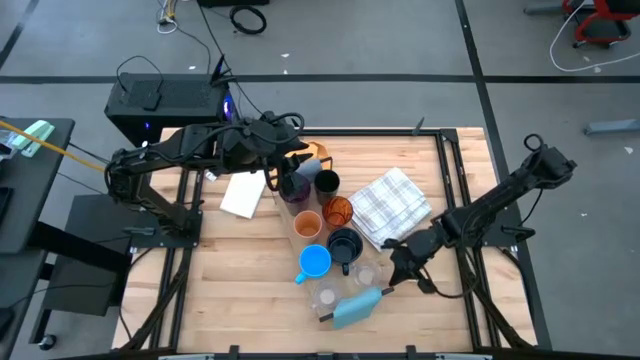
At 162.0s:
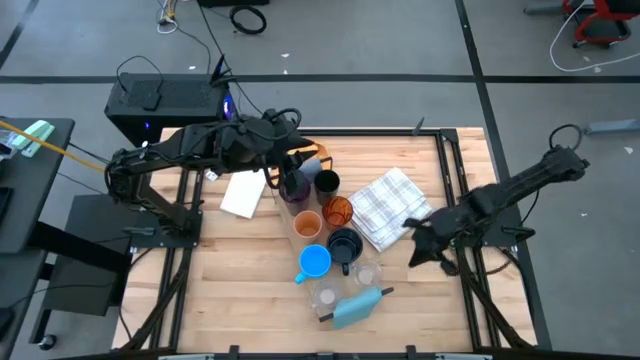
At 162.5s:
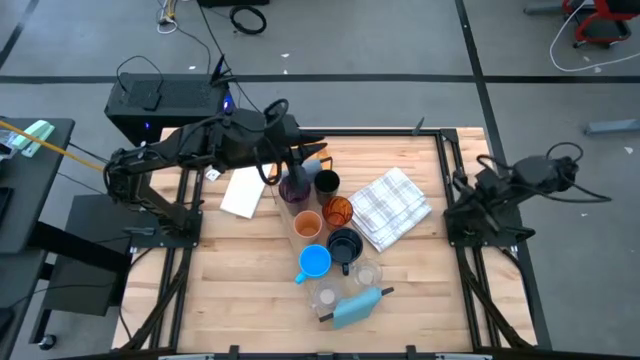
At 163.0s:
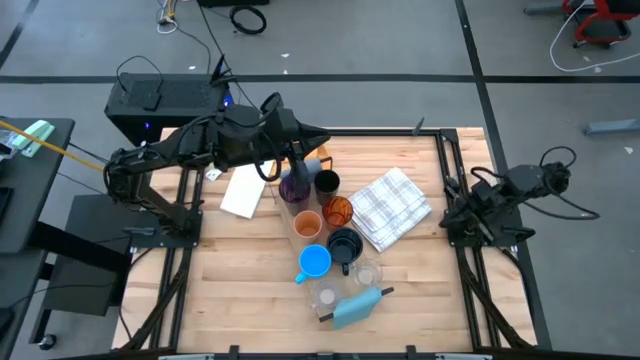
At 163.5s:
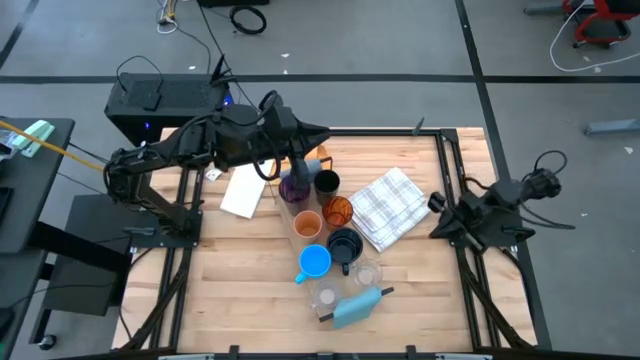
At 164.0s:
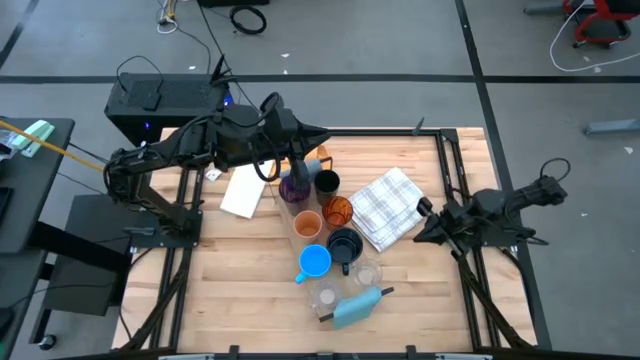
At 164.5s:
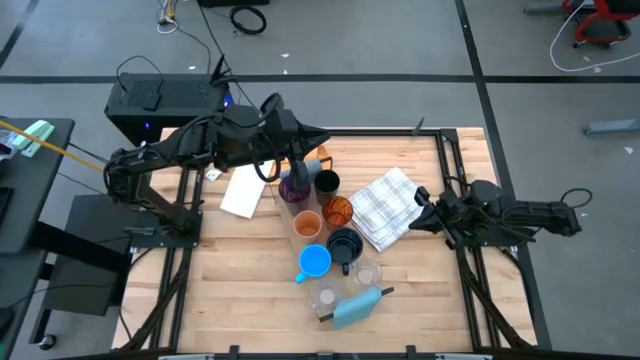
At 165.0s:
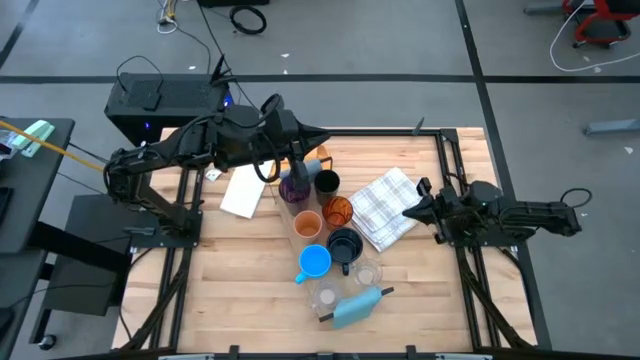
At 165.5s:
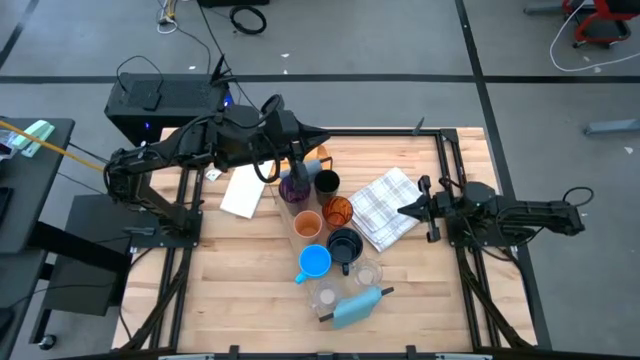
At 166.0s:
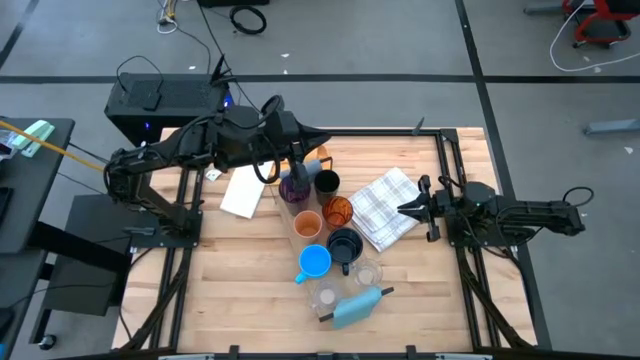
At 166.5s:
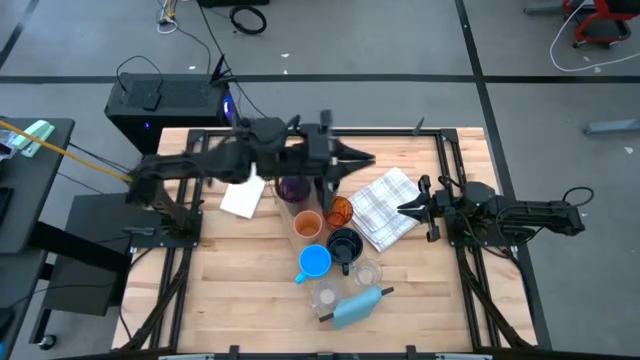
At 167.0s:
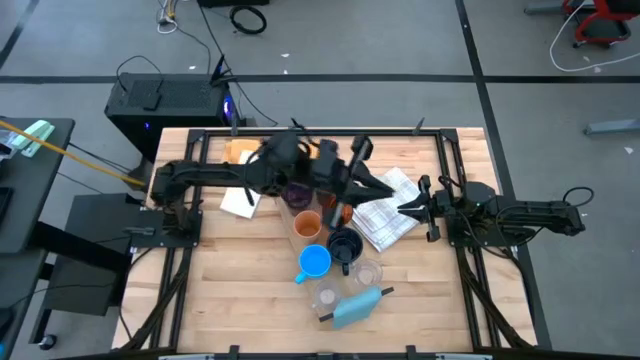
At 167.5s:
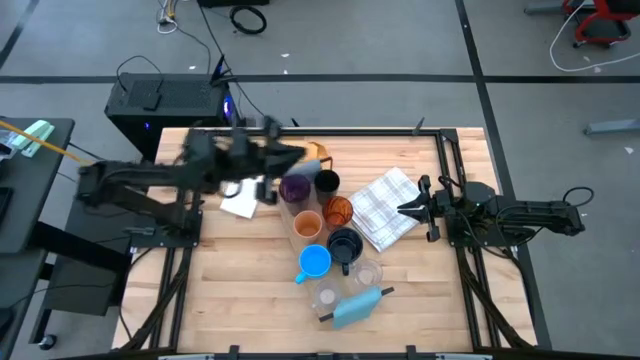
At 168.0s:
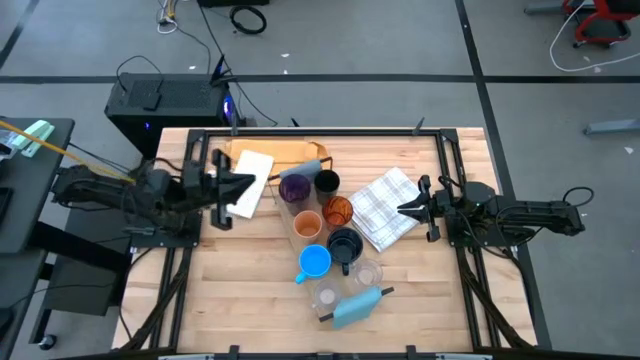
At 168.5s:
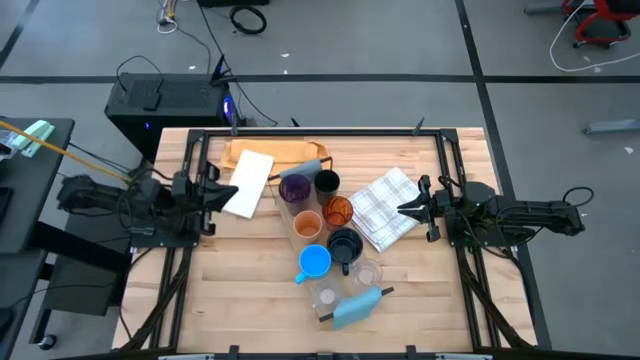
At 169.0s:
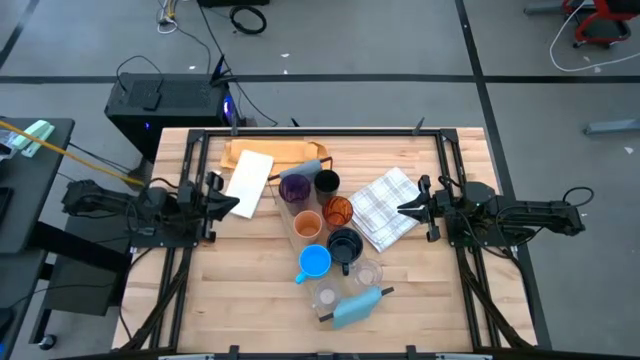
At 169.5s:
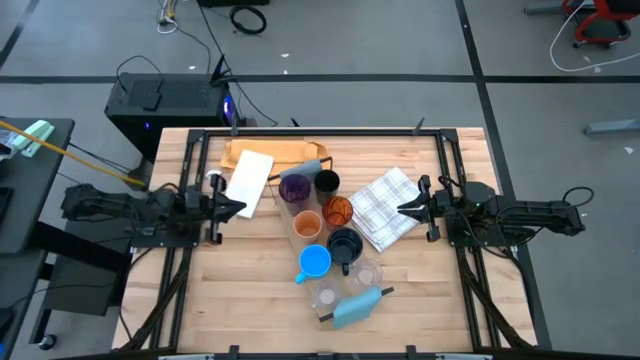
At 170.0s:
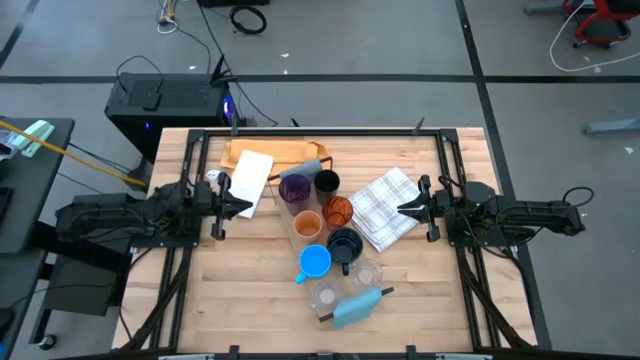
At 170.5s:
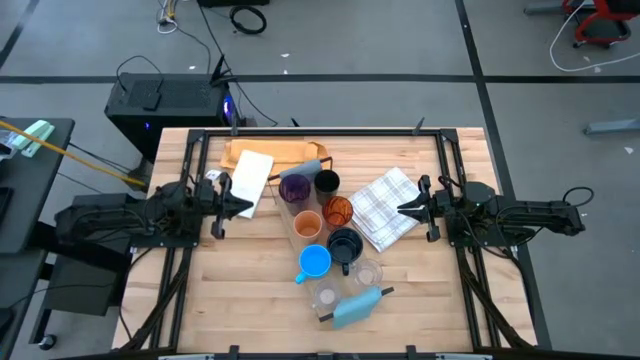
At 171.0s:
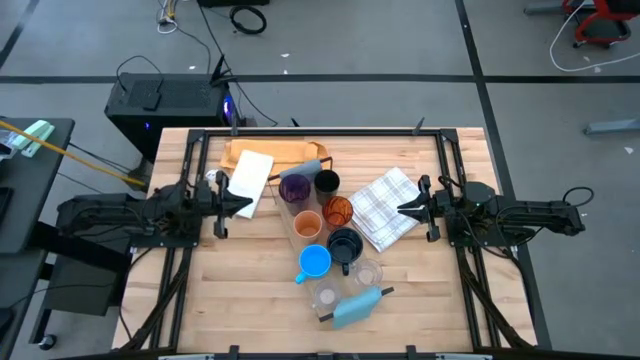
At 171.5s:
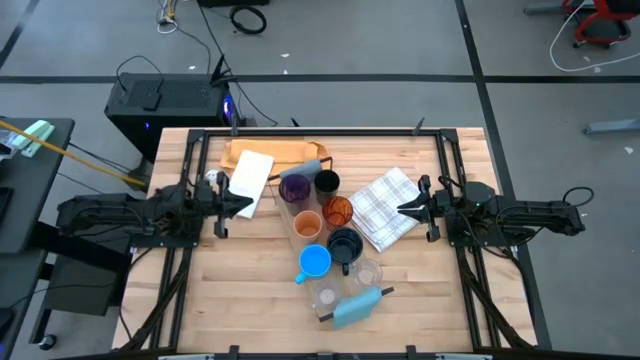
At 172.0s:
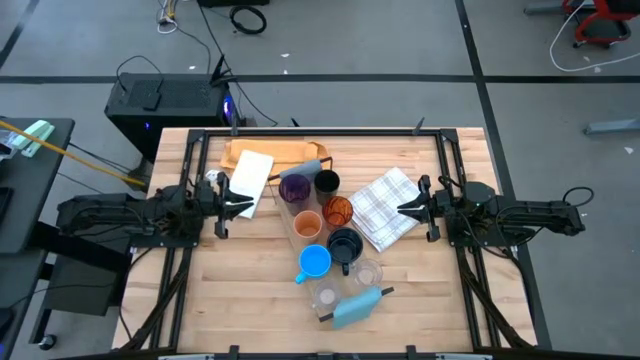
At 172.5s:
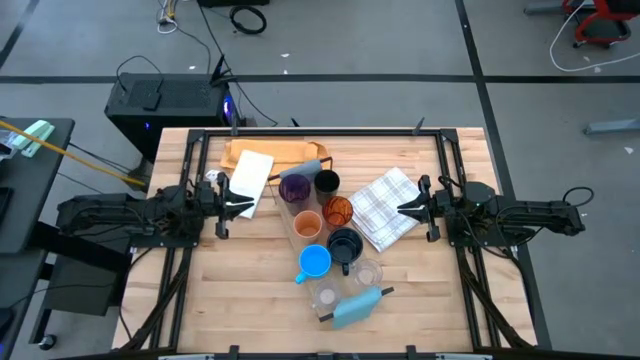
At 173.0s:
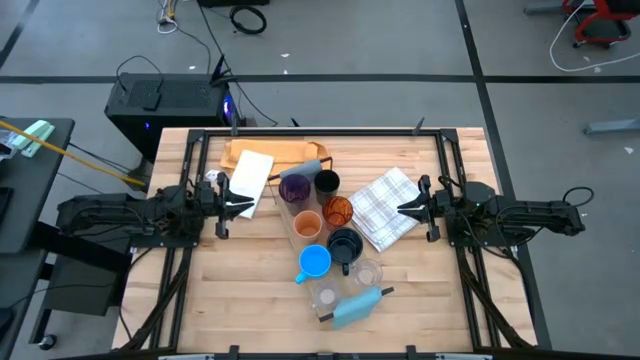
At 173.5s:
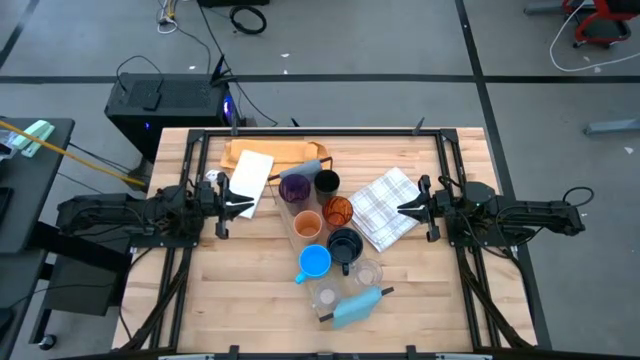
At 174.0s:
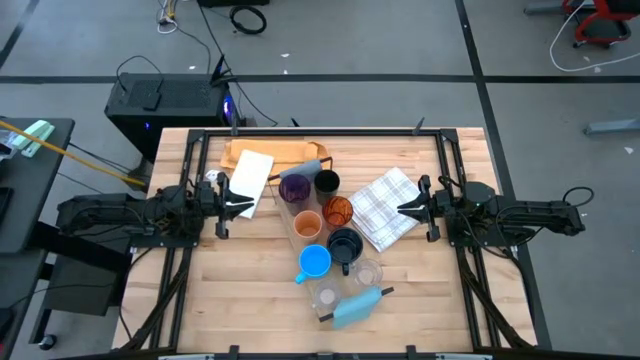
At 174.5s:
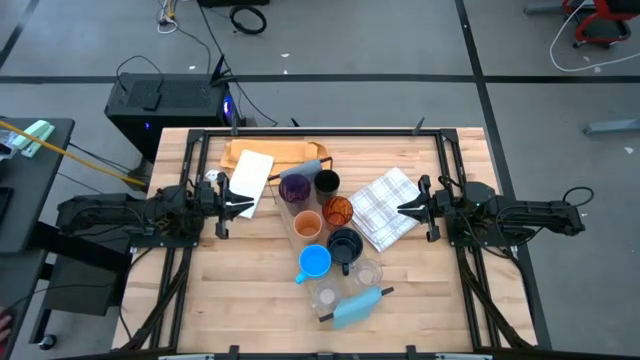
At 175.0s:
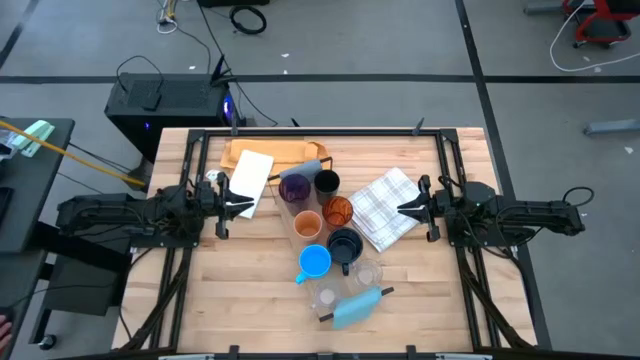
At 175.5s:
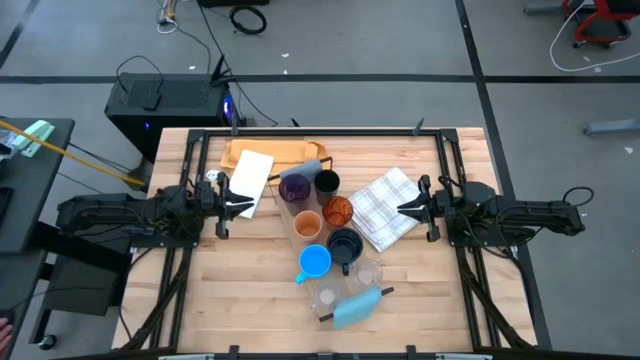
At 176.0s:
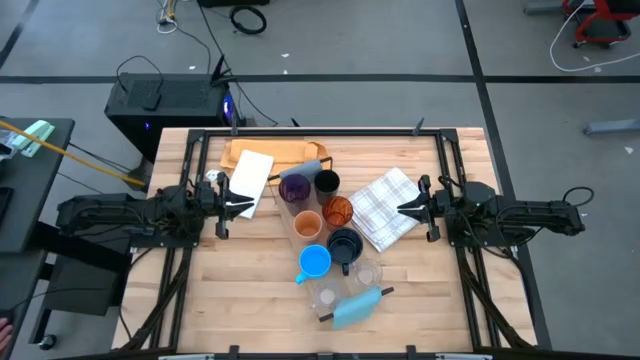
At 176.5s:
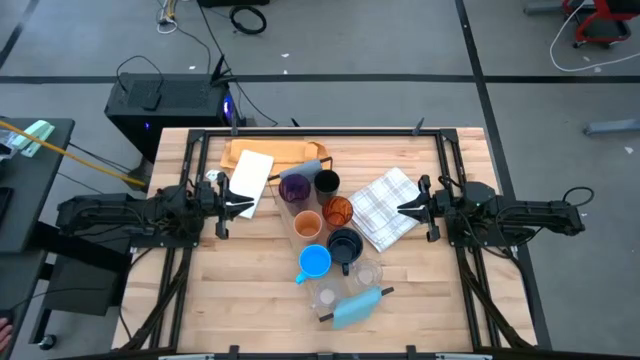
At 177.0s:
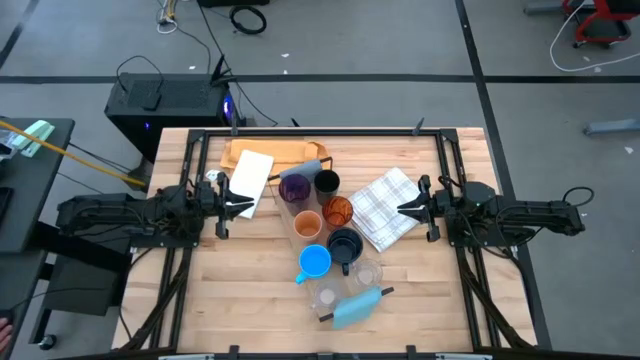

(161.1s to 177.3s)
Task: Stack small to large cups/mugs on shelf
Return to Home Position

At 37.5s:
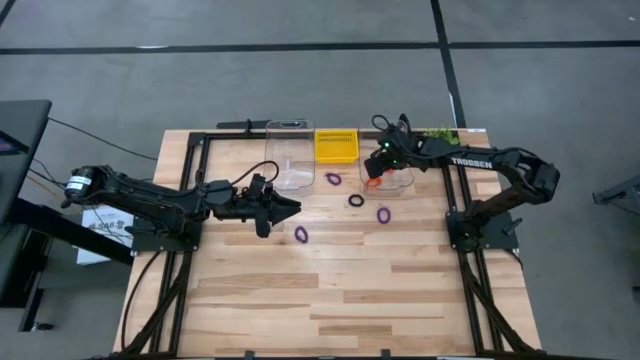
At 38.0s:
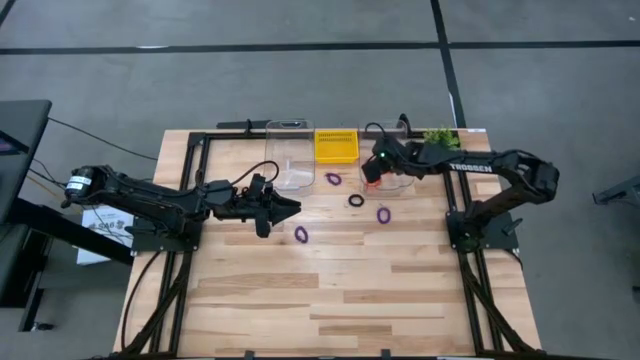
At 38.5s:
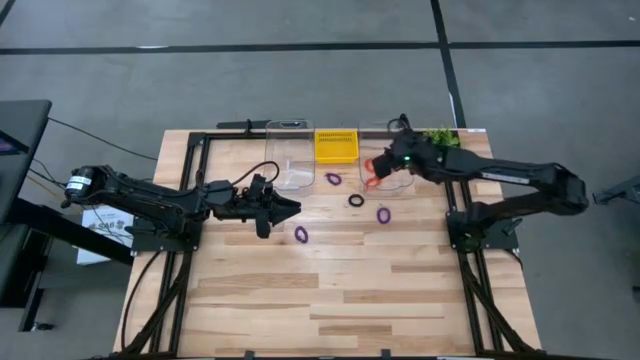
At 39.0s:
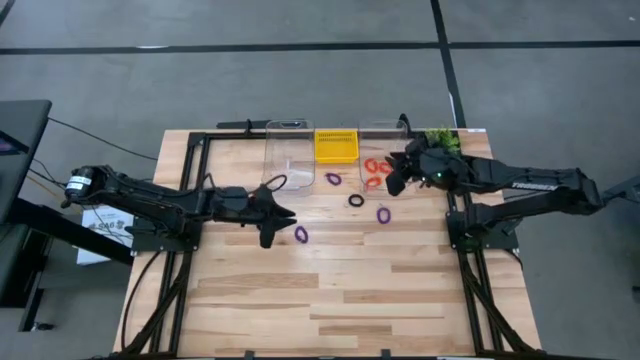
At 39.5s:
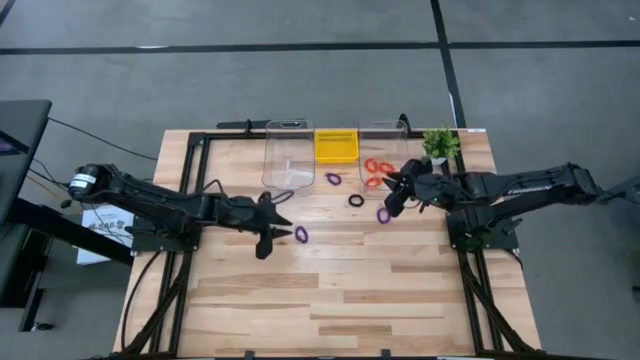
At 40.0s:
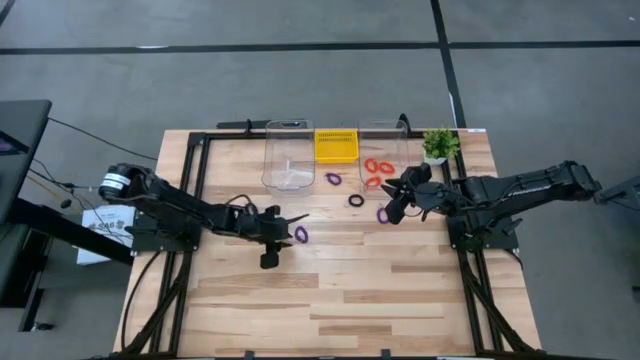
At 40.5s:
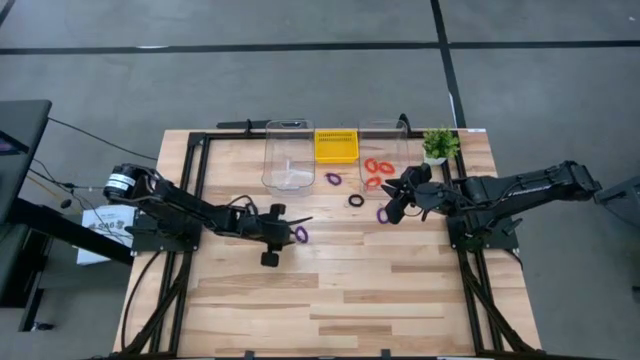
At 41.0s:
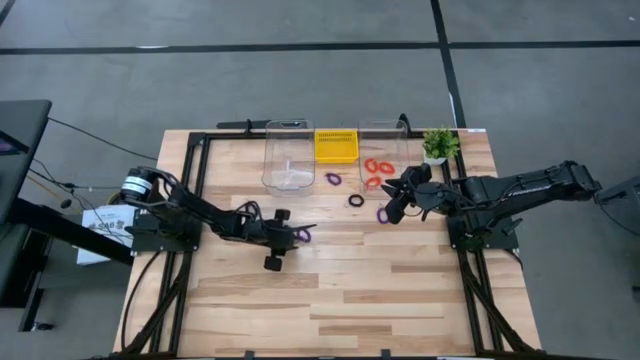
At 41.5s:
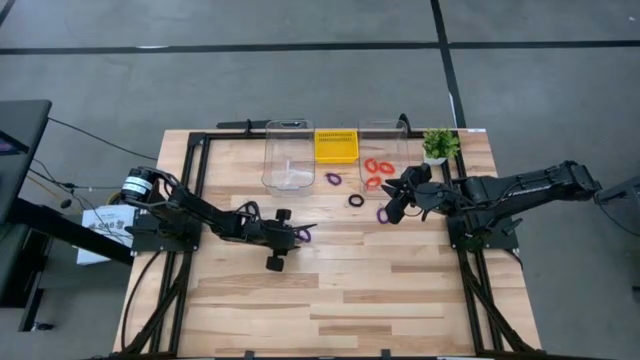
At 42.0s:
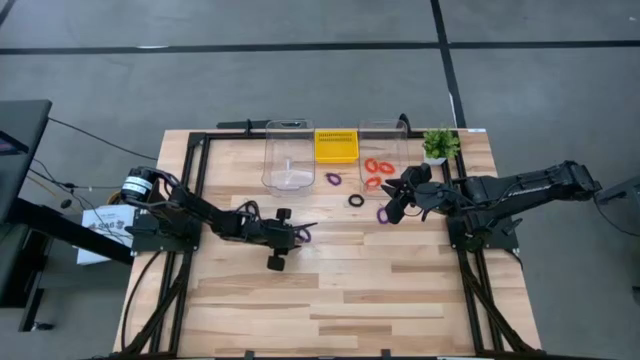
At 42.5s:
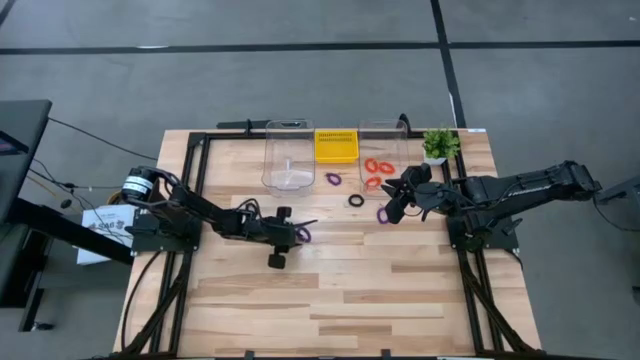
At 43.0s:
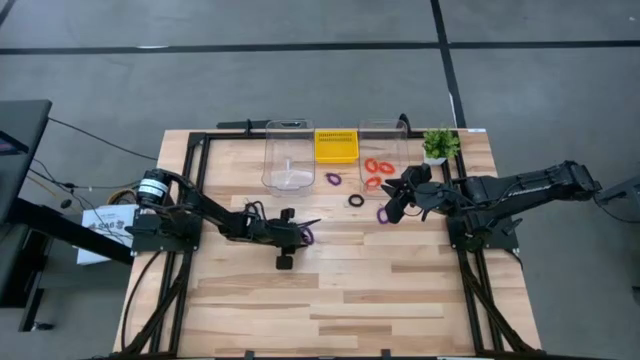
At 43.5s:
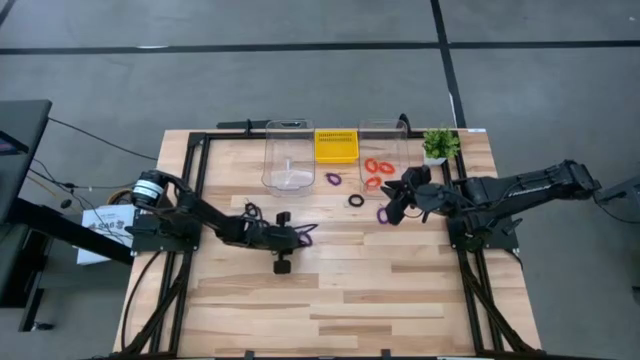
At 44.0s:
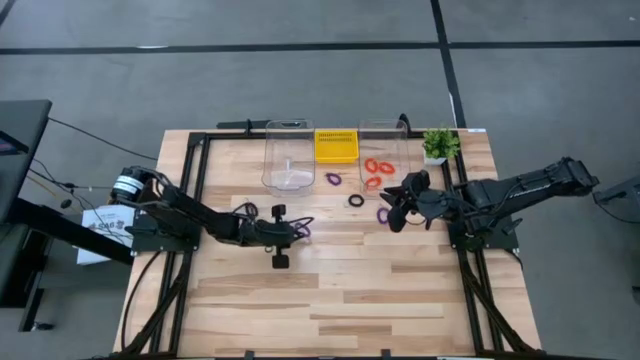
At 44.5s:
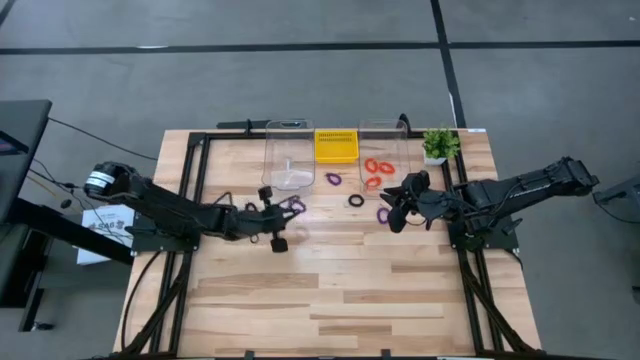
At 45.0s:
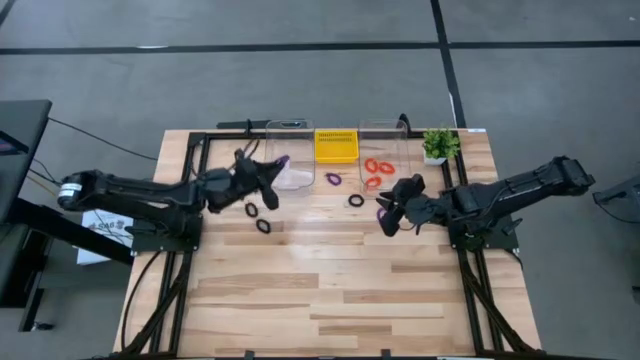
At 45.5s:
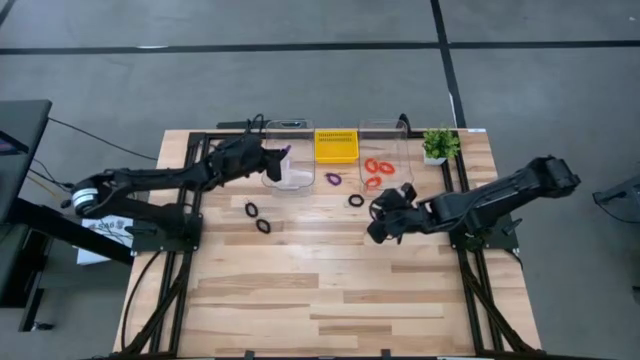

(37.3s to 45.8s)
Task: Sort spring keychains
Put the left bottom purple spring keychain into the left transparent bin
